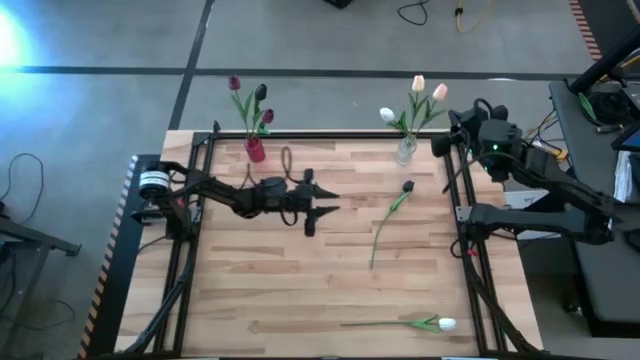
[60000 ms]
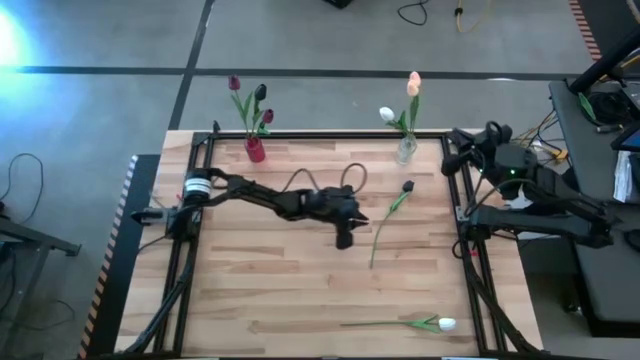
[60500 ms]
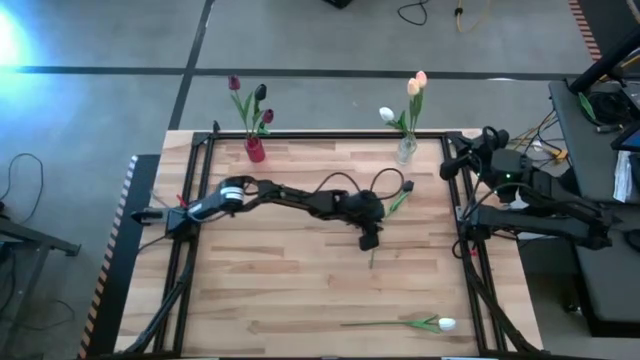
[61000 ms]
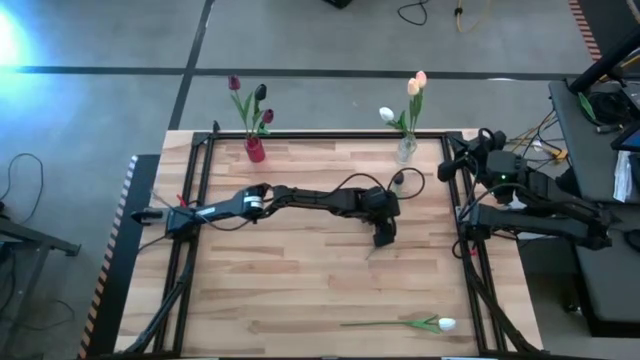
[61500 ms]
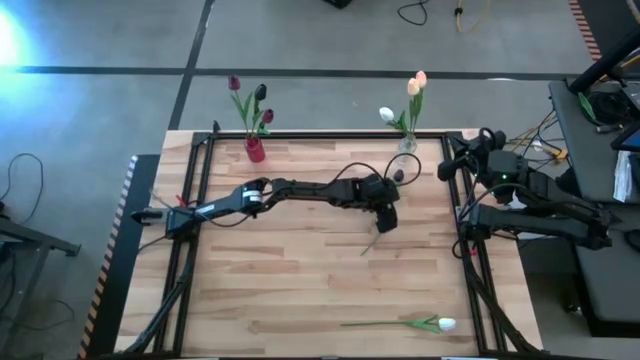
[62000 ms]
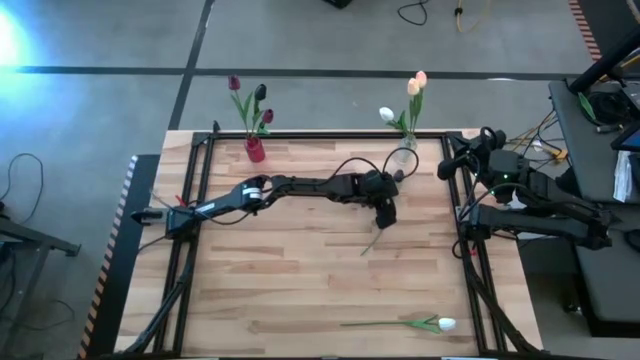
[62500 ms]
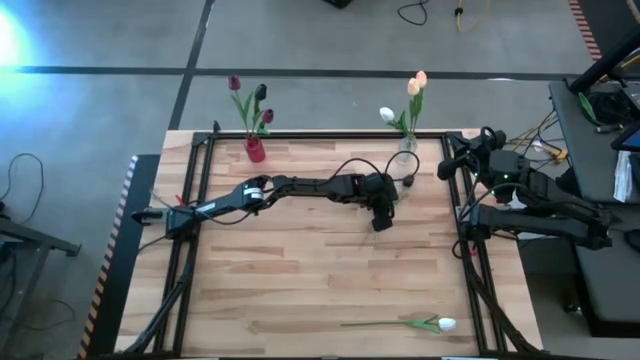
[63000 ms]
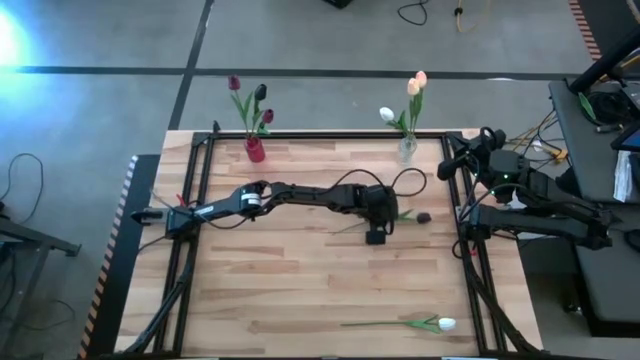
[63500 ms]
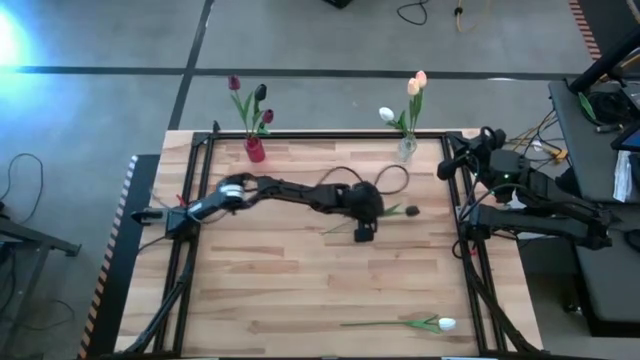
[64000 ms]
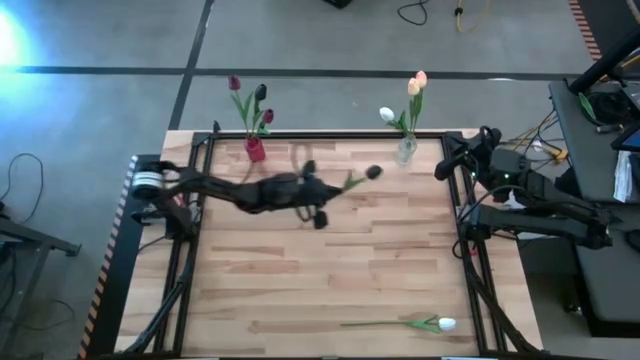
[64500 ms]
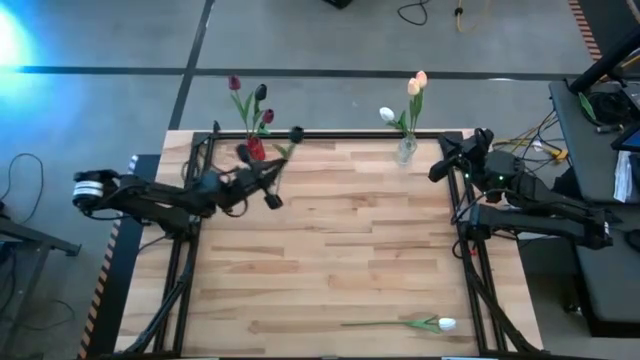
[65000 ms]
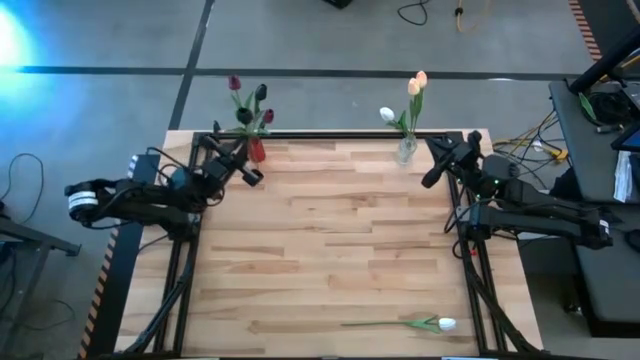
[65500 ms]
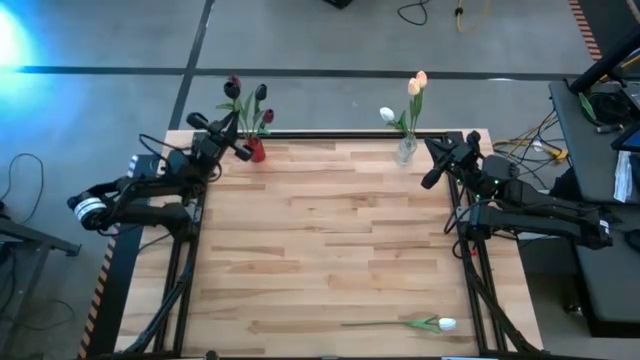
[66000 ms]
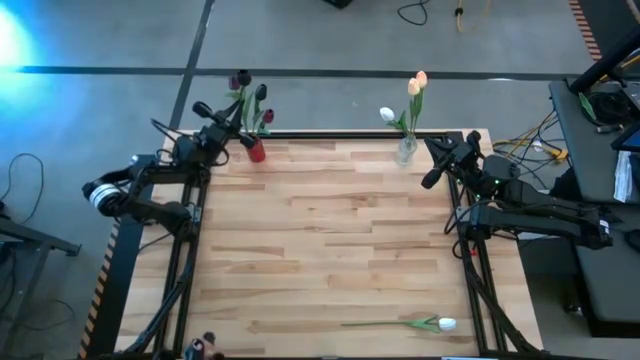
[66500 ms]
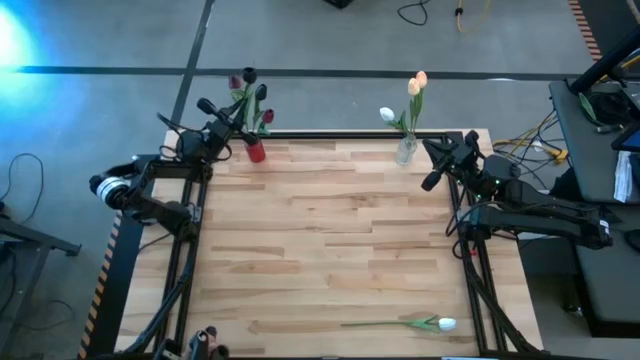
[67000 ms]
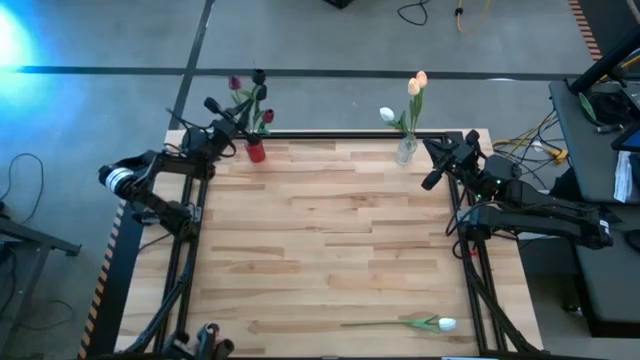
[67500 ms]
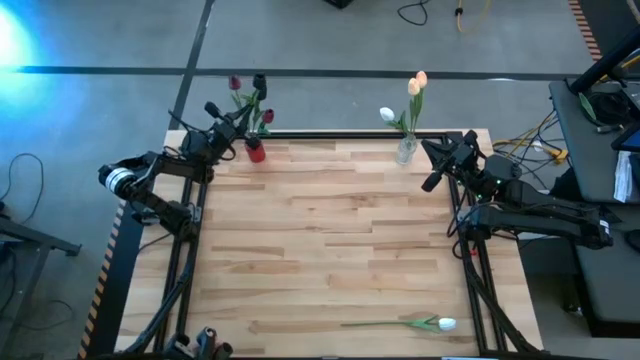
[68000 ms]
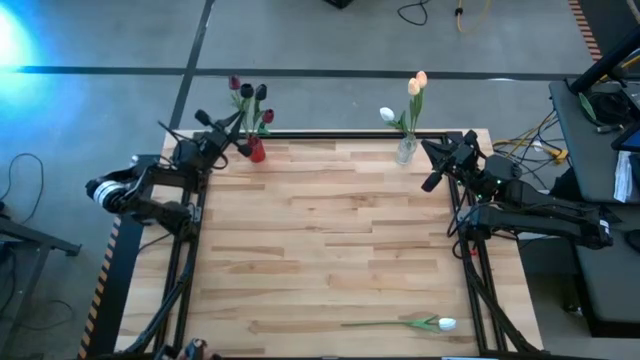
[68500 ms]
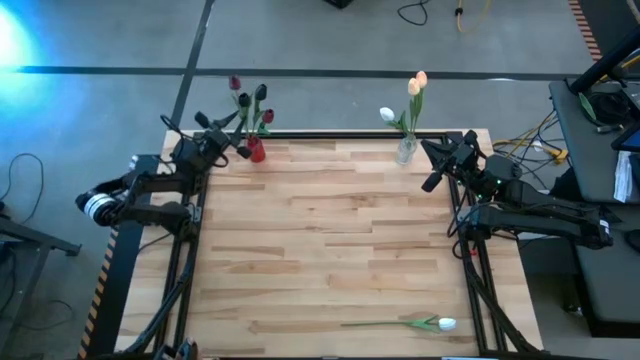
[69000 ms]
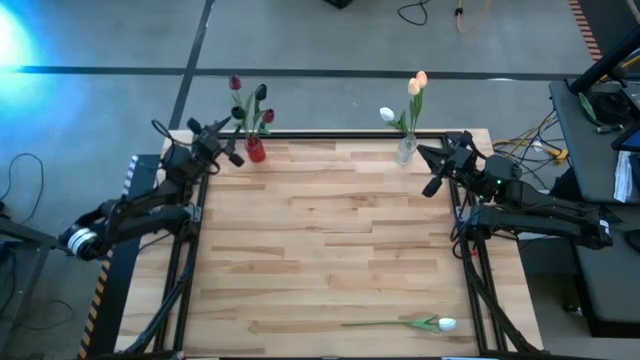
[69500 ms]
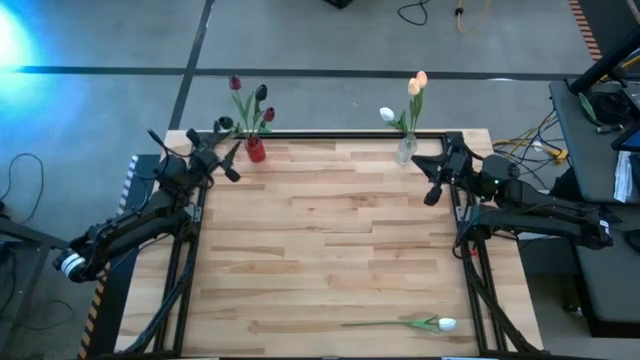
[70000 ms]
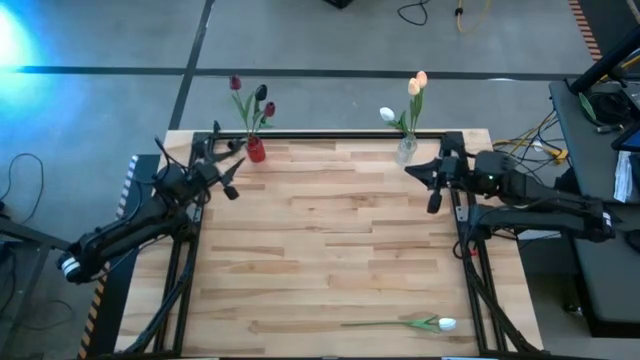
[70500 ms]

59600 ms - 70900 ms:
Task: Sort flowers into vase by color
Put the black flower into the red vase

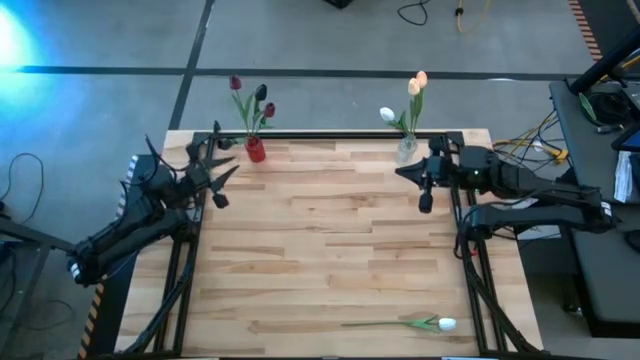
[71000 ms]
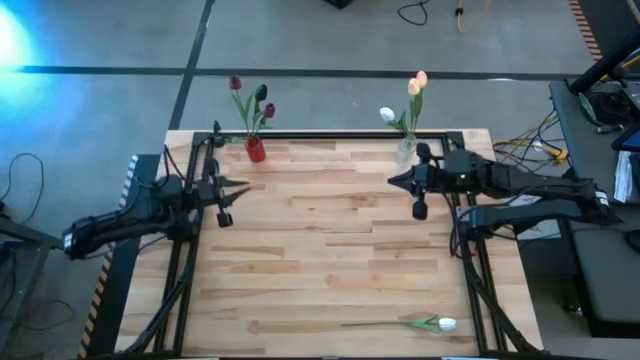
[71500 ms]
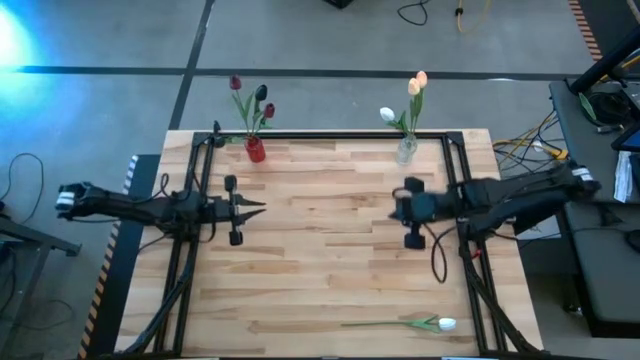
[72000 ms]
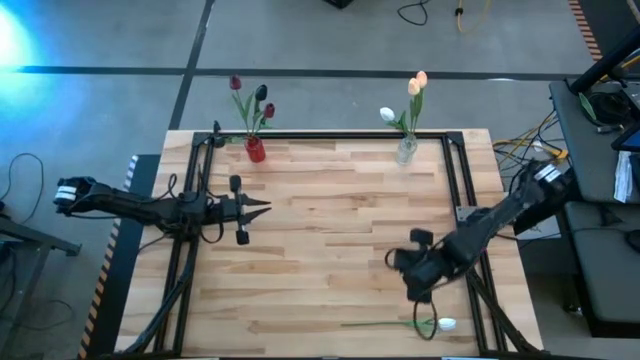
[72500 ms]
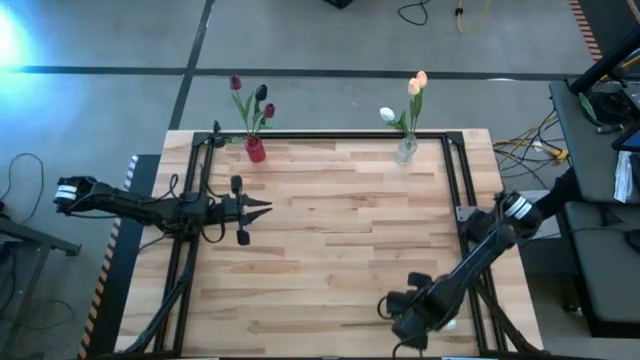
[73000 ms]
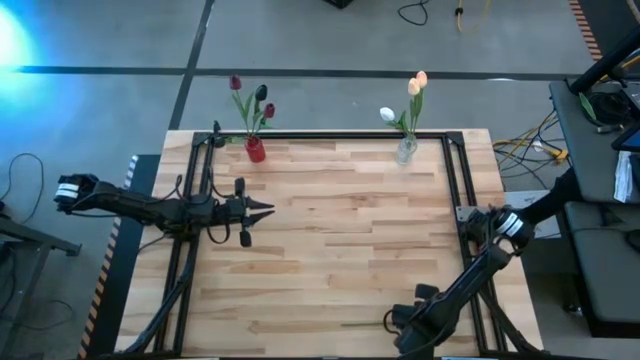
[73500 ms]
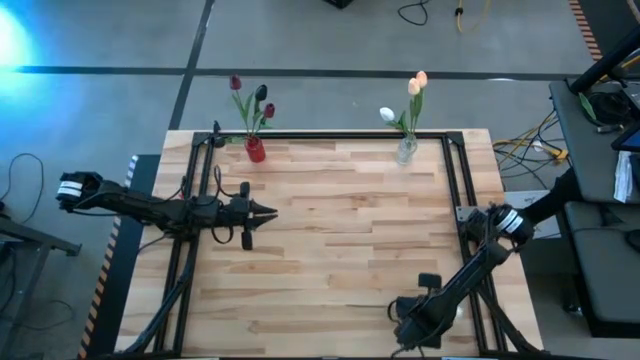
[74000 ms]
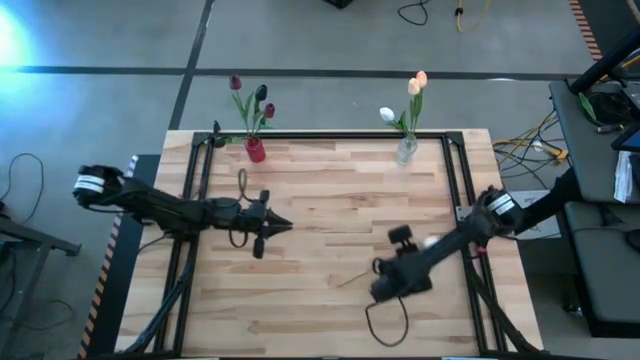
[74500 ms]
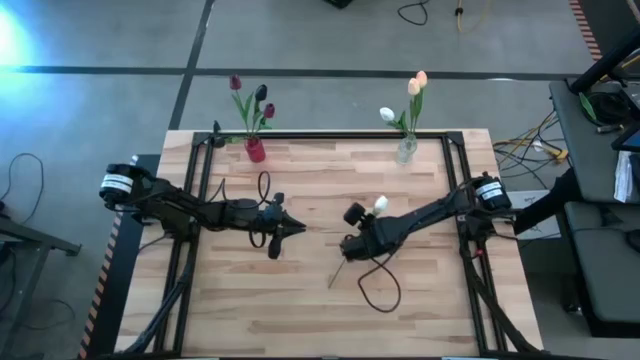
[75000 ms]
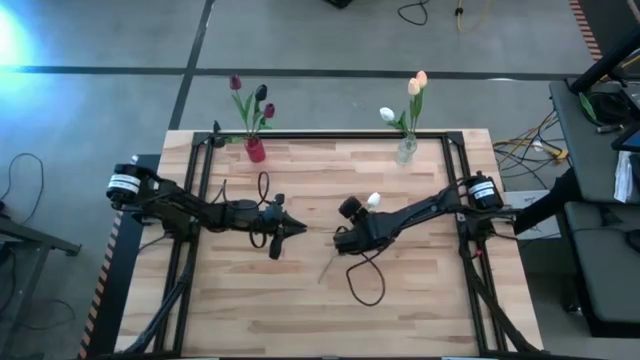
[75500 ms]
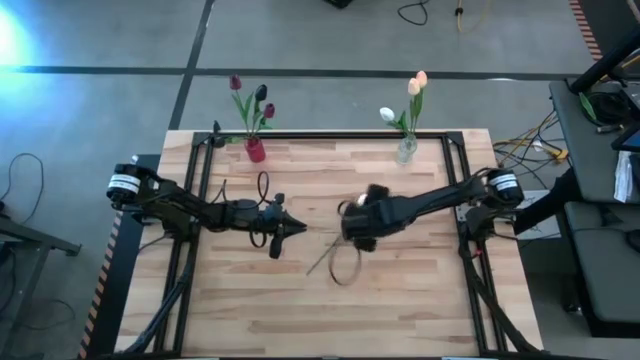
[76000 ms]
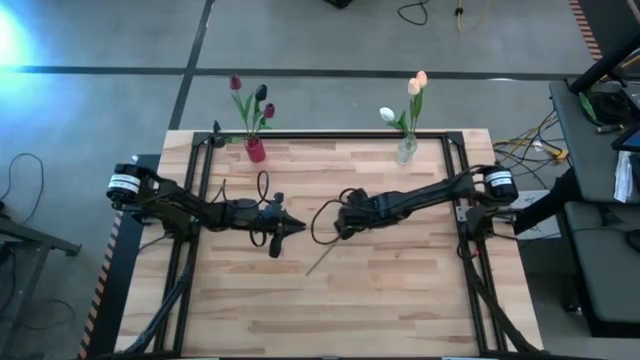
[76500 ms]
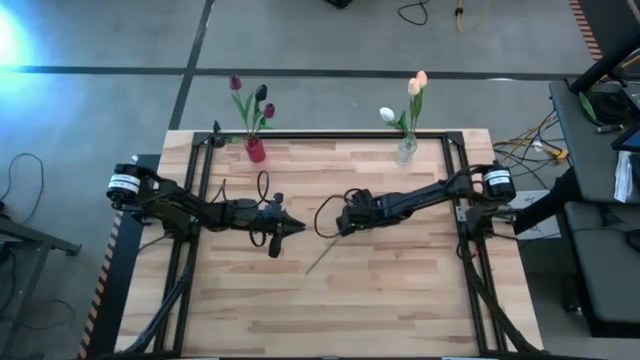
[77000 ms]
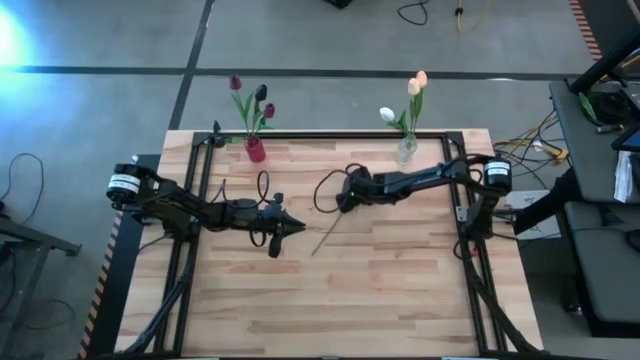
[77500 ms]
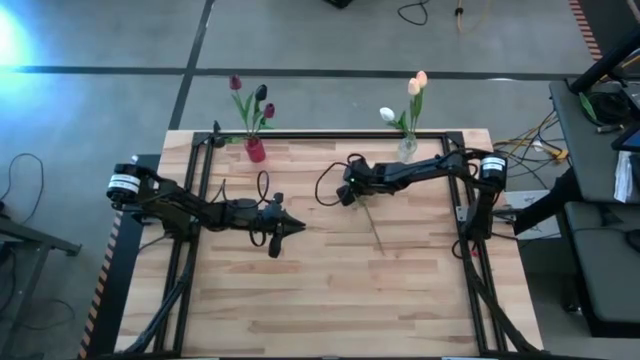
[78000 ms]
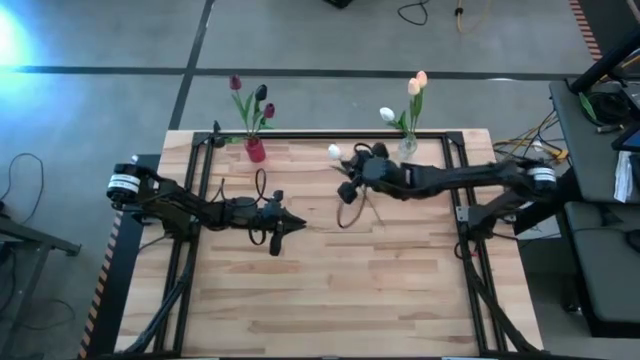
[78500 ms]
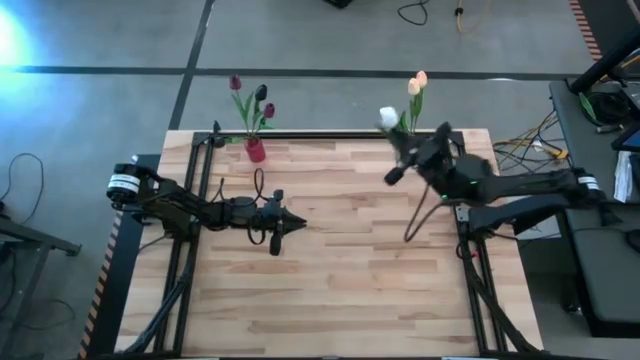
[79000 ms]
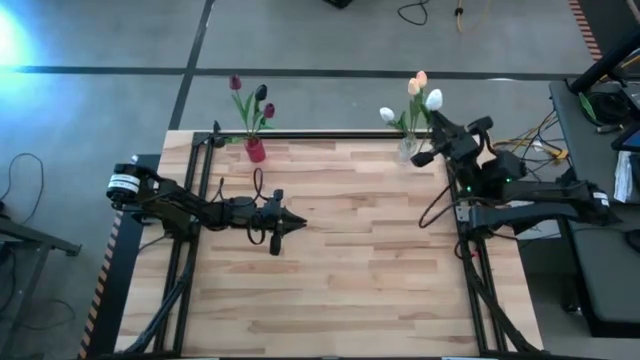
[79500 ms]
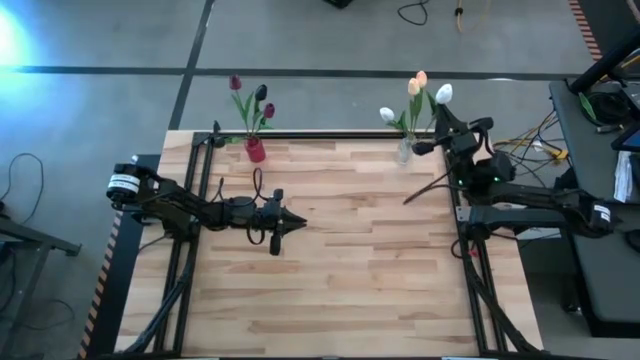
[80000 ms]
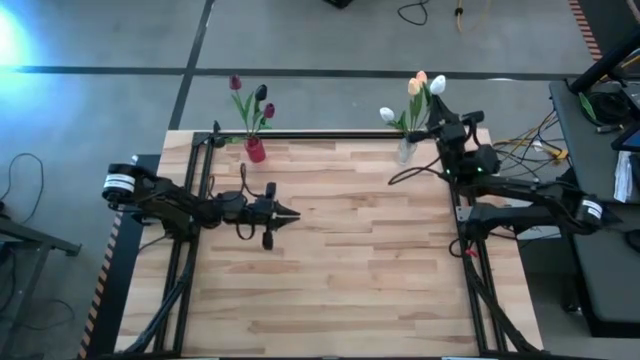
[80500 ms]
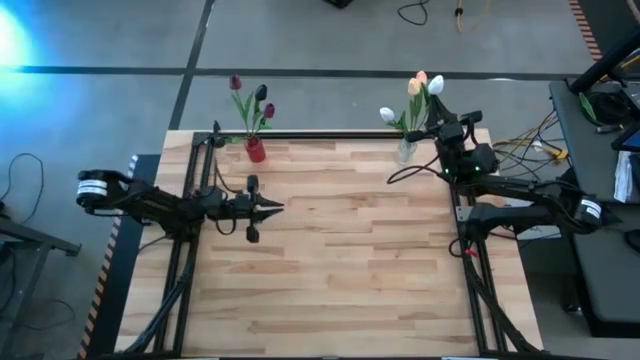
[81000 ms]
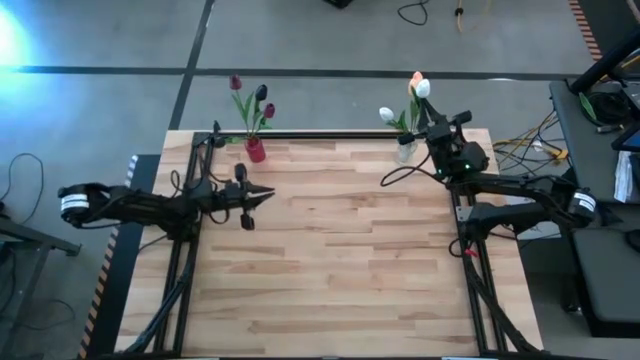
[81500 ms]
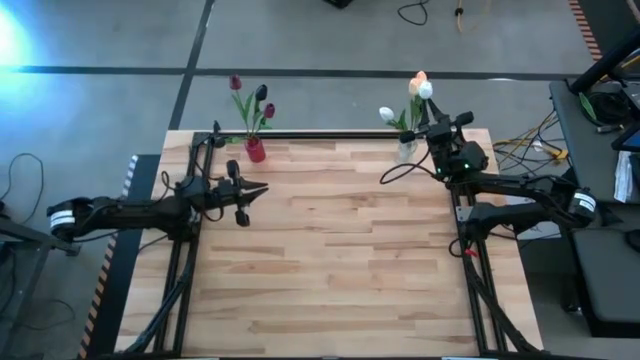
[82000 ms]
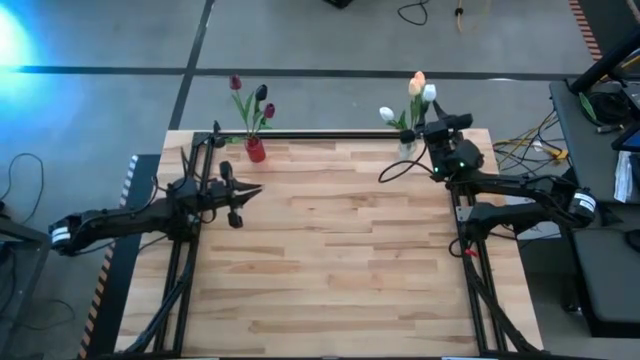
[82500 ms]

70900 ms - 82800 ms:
Put the white flower into the transparent vase
